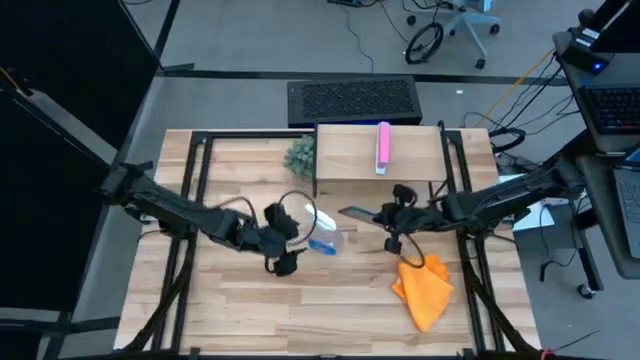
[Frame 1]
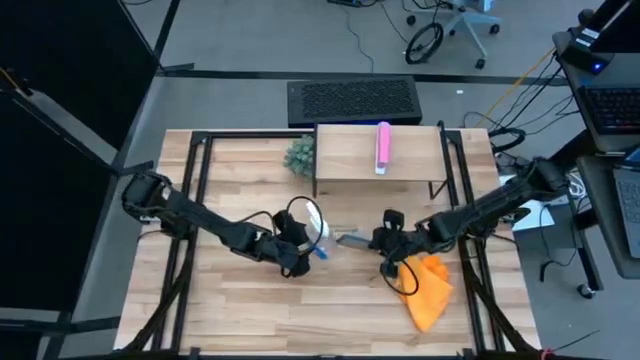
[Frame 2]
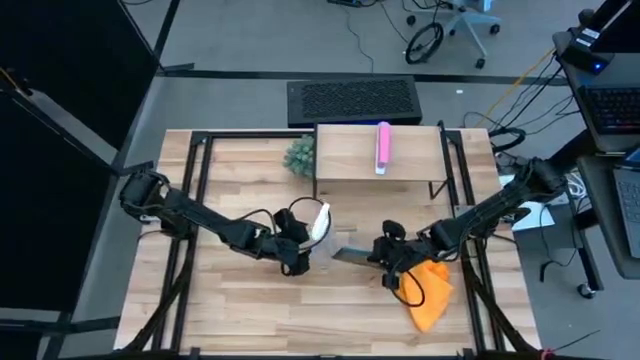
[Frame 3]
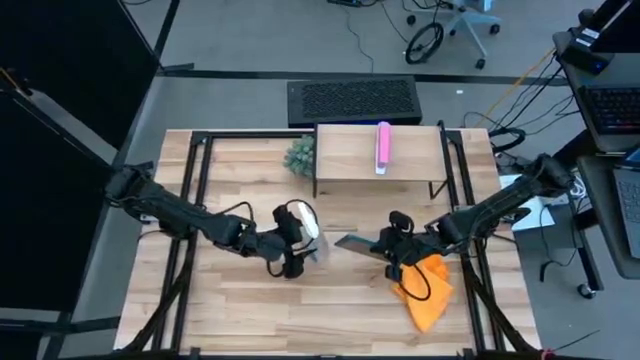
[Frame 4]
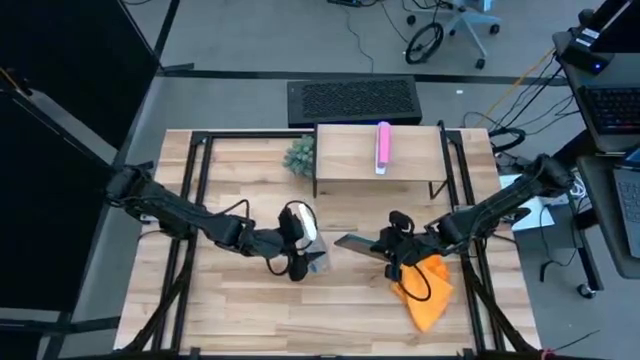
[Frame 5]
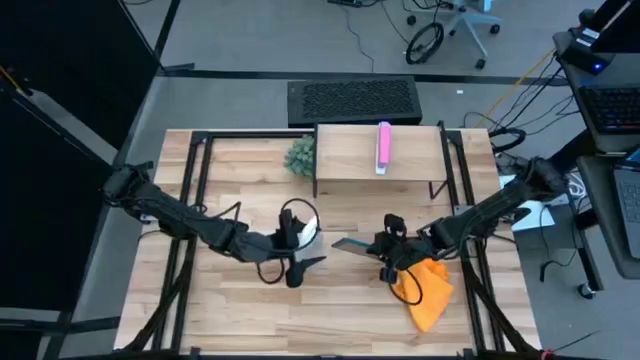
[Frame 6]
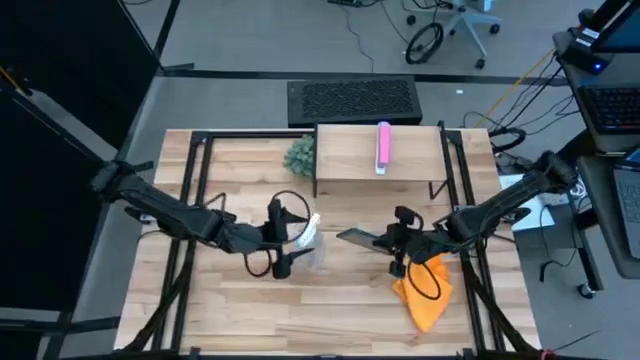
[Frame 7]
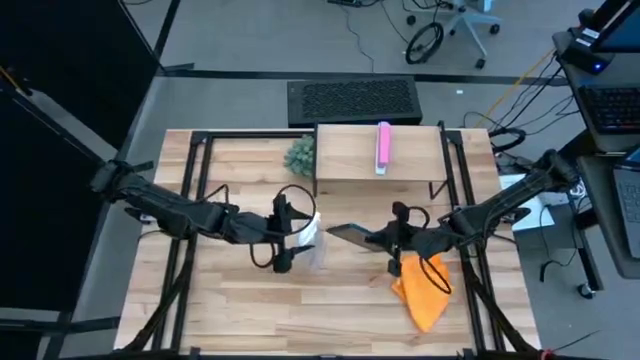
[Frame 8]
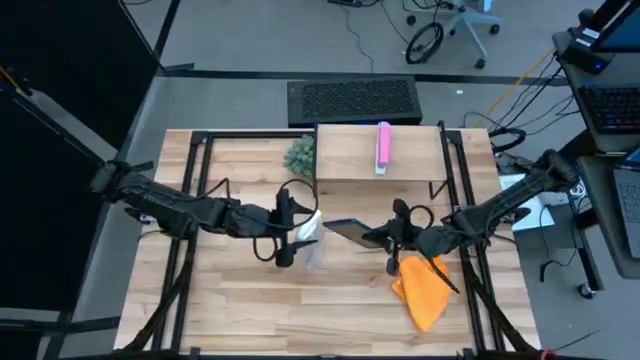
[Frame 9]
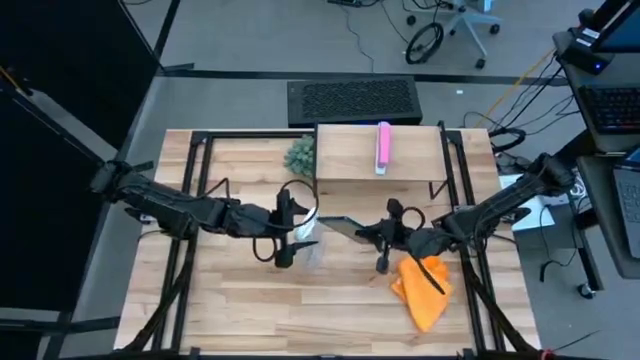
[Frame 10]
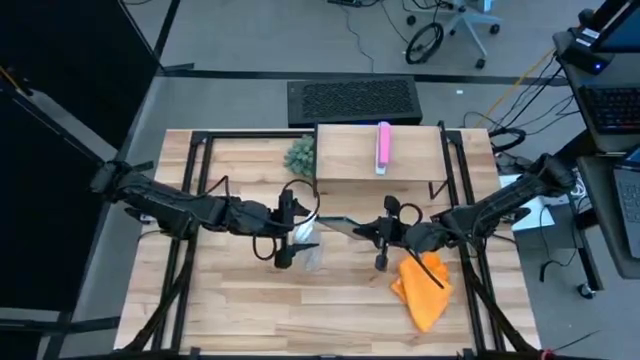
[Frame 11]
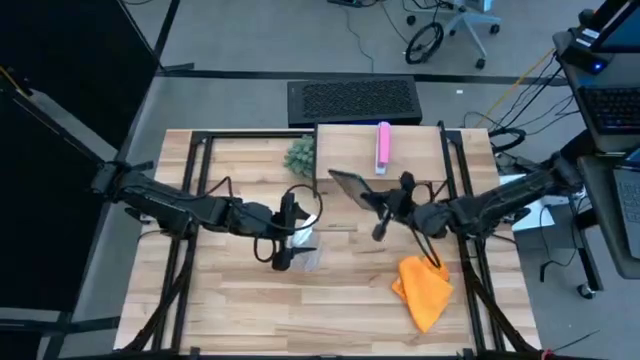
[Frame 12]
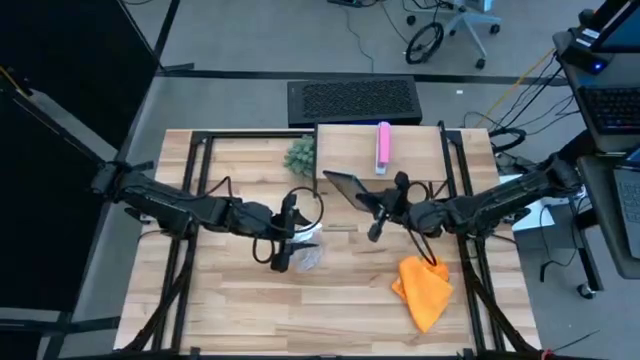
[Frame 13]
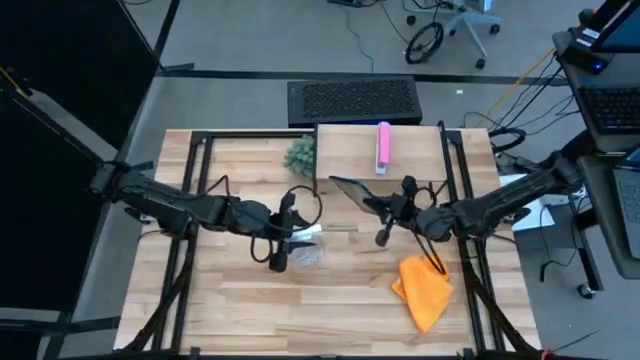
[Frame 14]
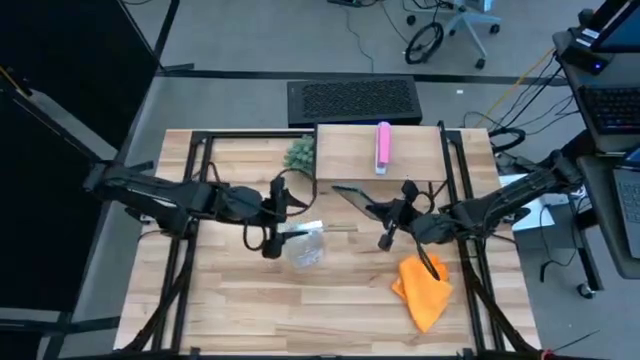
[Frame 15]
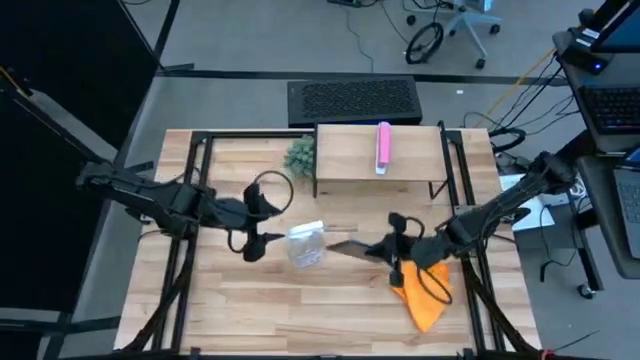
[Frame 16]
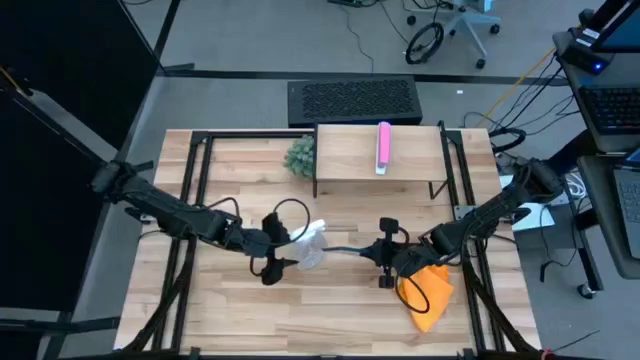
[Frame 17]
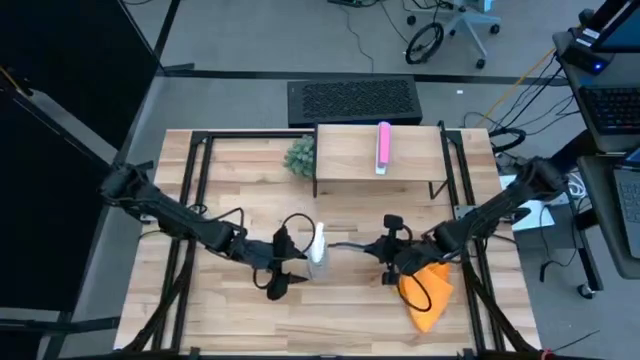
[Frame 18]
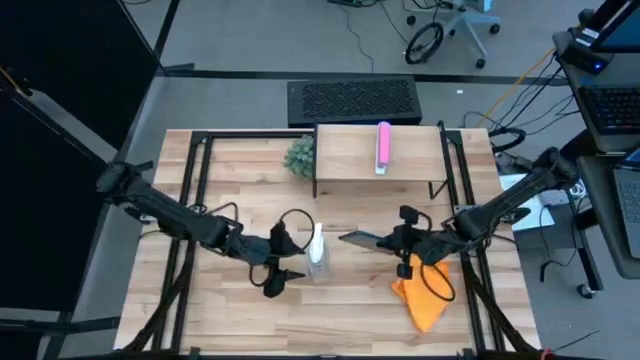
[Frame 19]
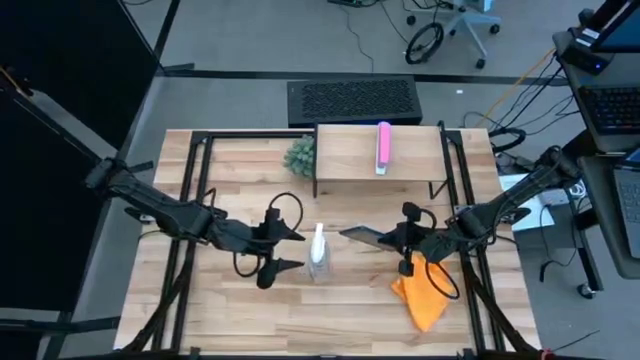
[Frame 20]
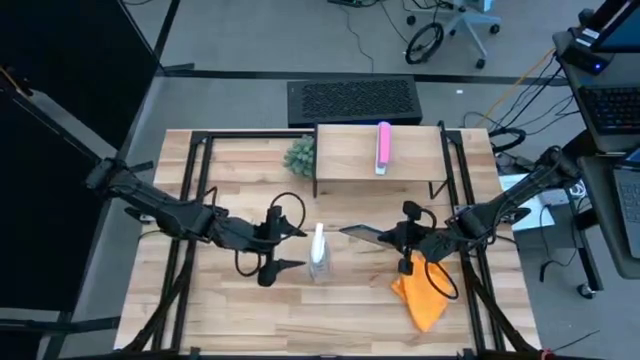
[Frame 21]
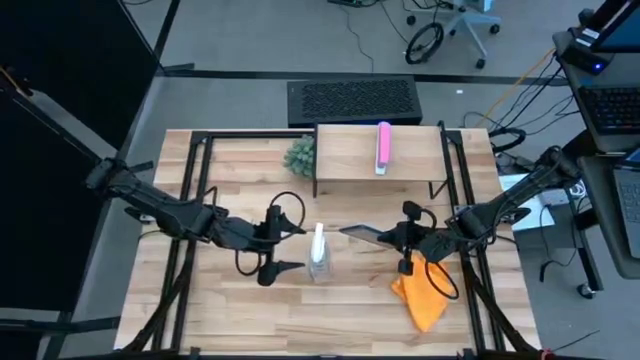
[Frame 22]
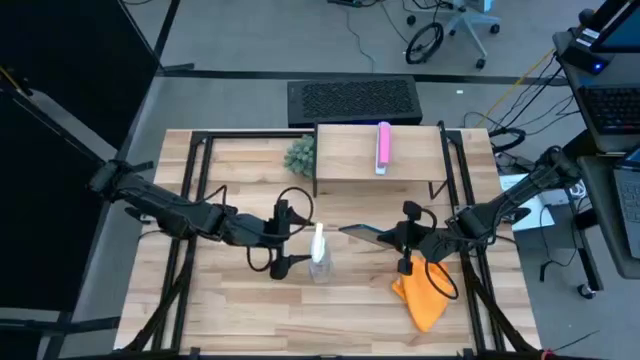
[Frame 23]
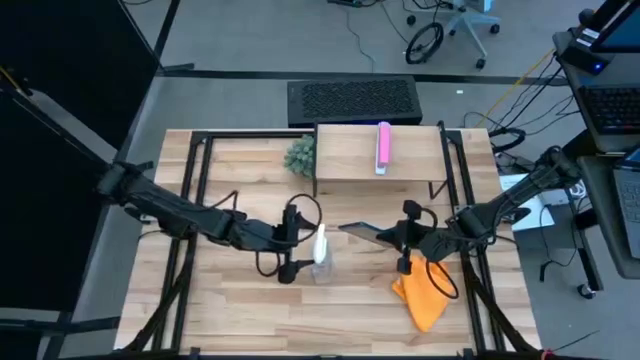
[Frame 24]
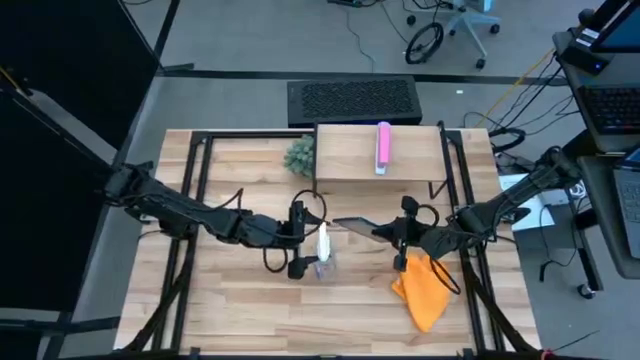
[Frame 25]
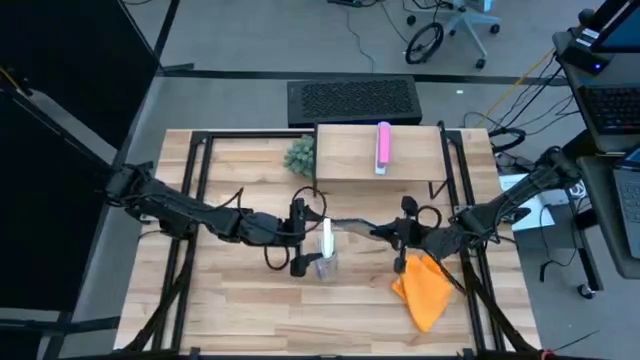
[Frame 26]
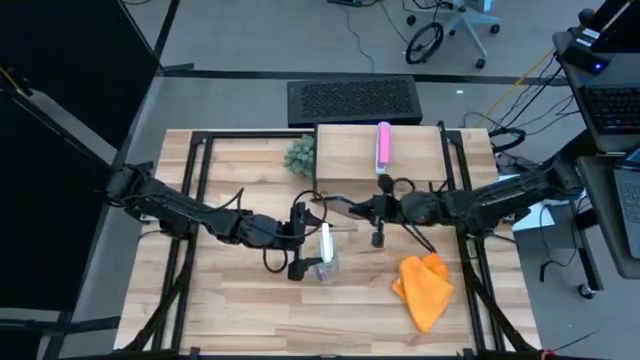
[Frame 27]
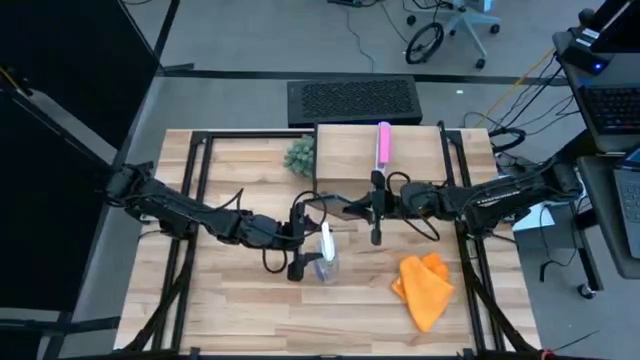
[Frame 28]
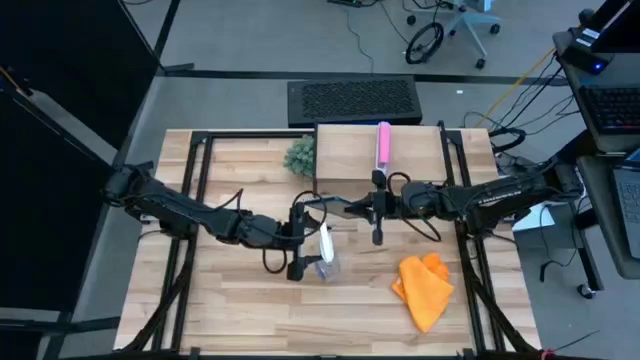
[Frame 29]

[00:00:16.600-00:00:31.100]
Task: Apply microfiber cloth
Spray the tablet with the bottle cleaner

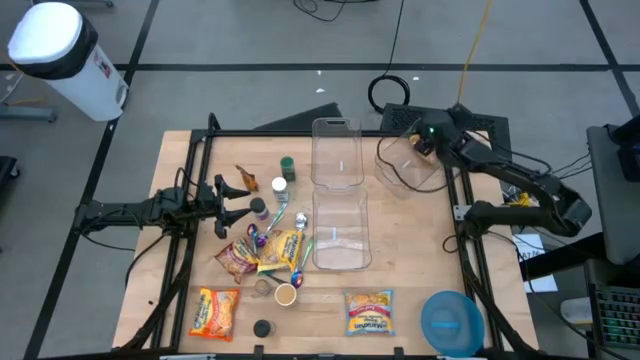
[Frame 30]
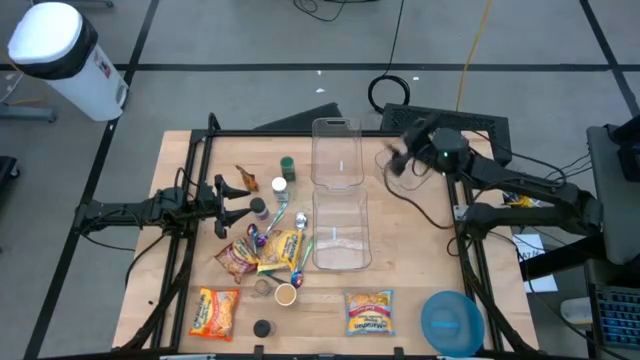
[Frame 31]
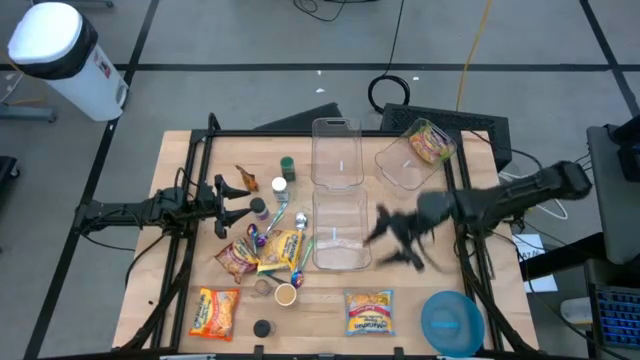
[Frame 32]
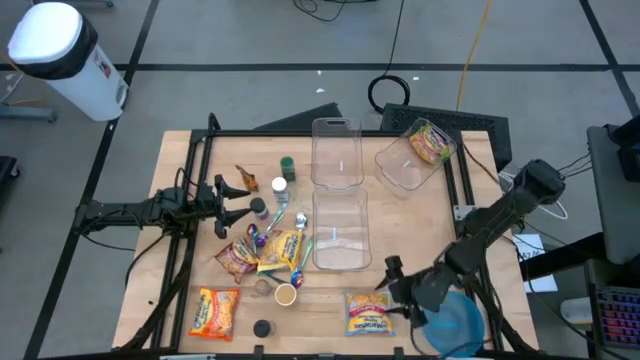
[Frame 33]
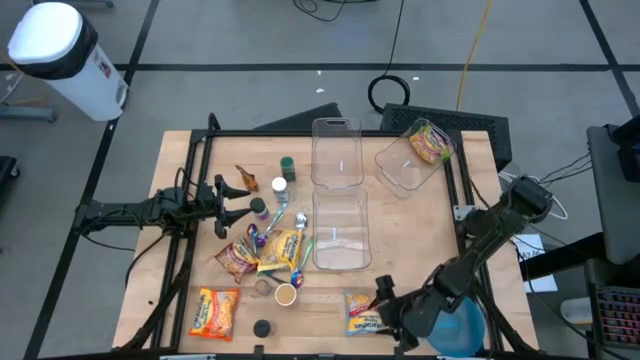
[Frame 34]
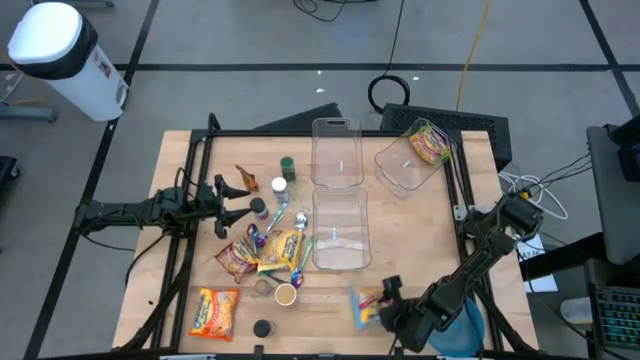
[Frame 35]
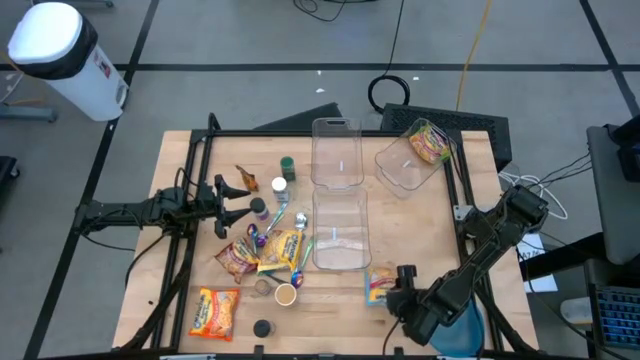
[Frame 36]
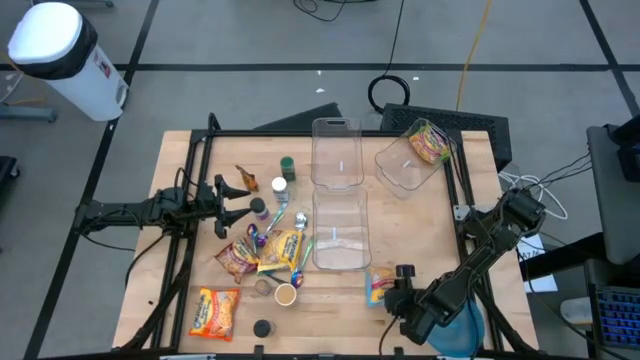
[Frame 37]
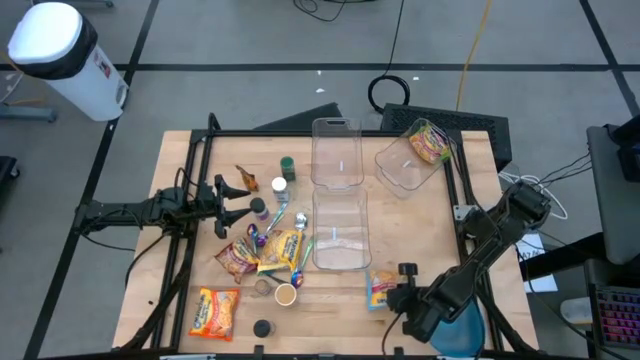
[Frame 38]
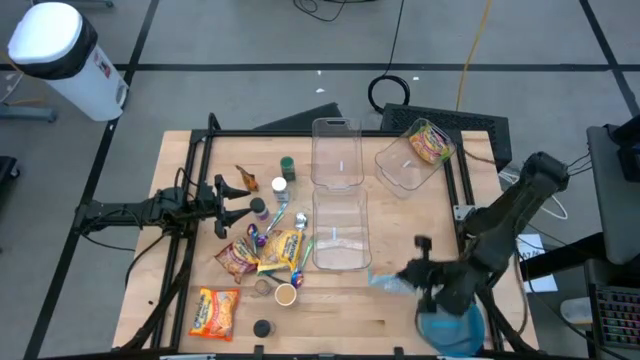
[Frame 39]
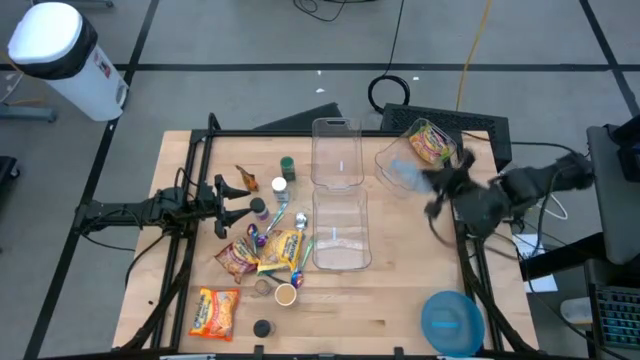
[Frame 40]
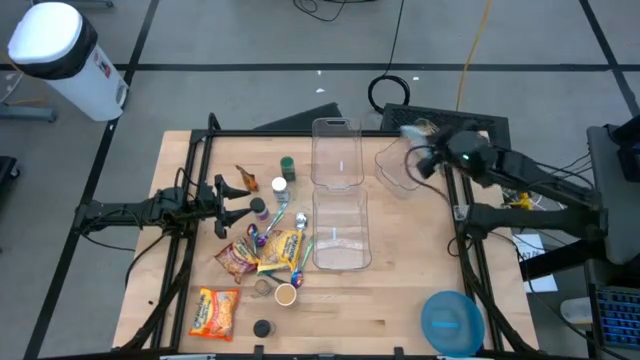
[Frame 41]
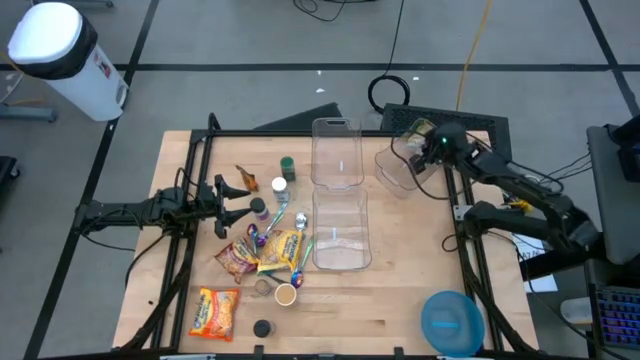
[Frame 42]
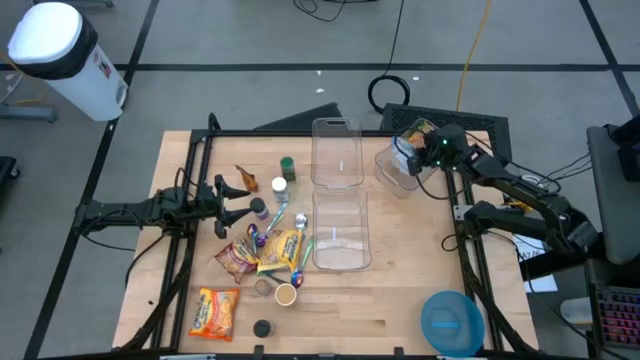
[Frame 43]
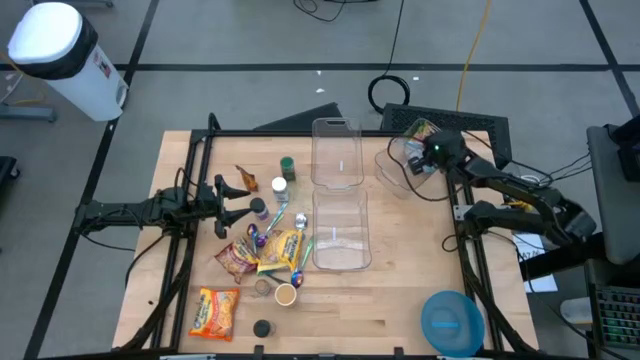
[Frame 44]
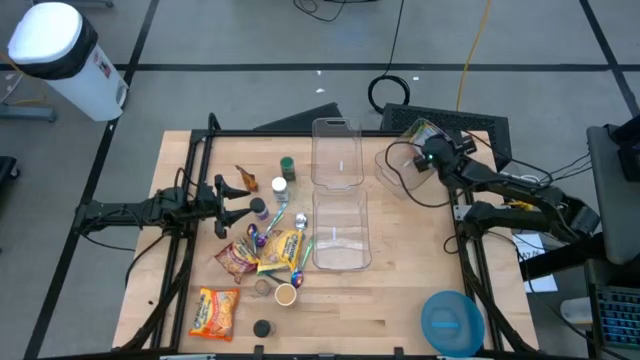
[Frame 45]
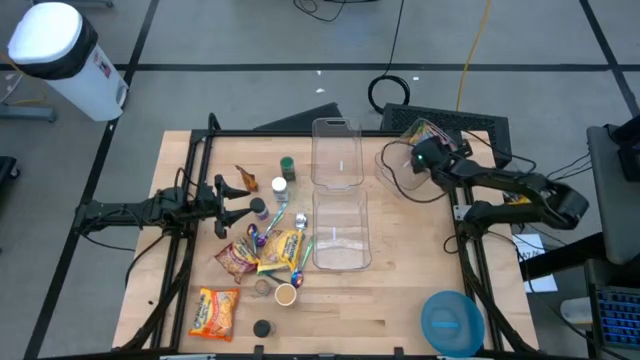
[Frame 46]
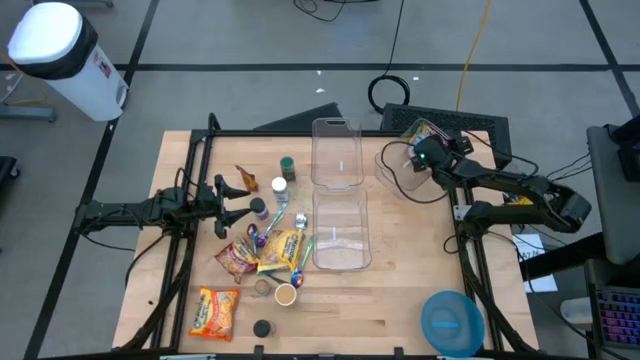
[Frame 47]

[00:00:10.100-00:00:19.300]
Task: Pick & Place Food Item
Put the blue noodle pack into the top right transparent bin
